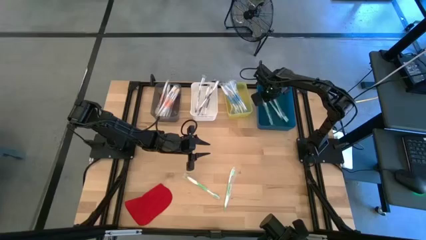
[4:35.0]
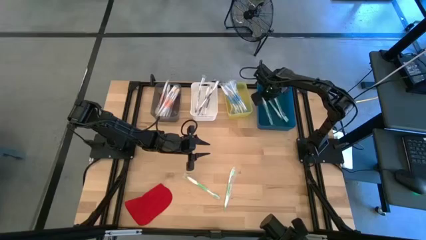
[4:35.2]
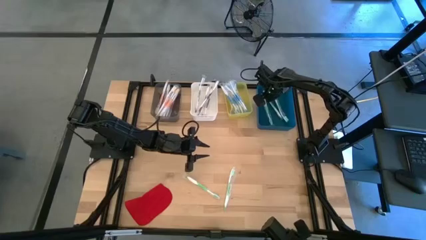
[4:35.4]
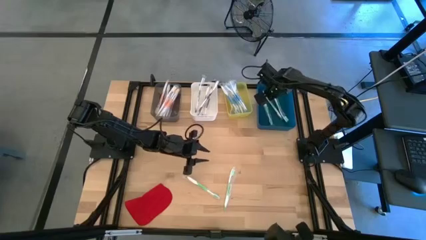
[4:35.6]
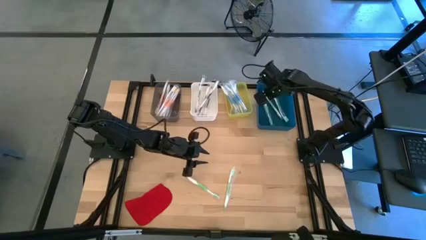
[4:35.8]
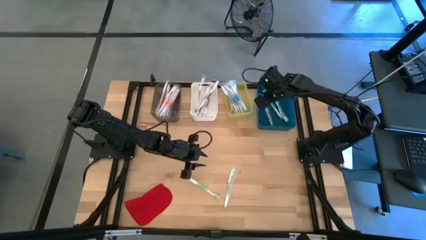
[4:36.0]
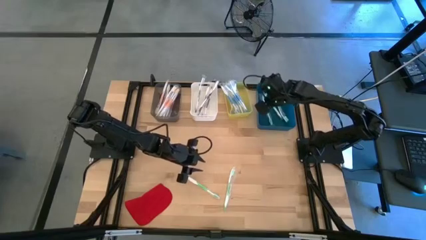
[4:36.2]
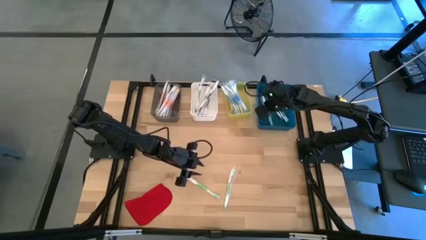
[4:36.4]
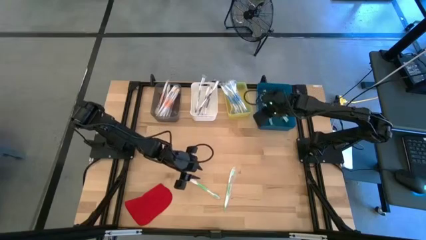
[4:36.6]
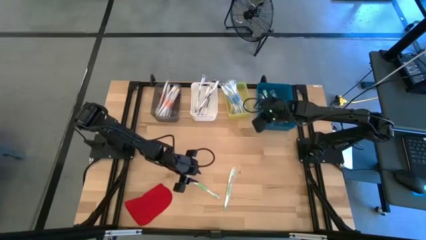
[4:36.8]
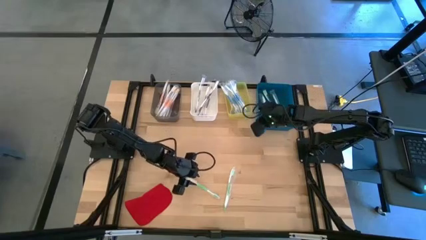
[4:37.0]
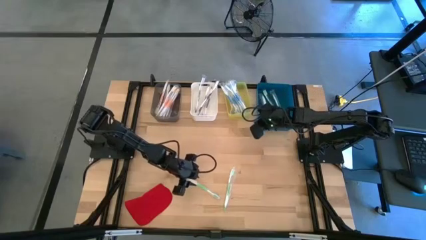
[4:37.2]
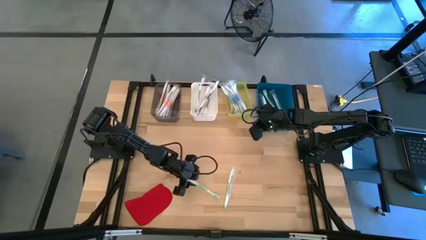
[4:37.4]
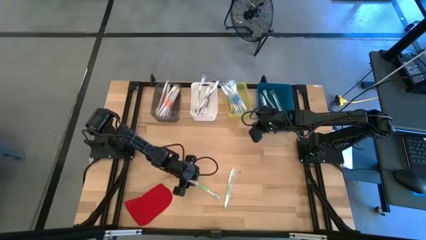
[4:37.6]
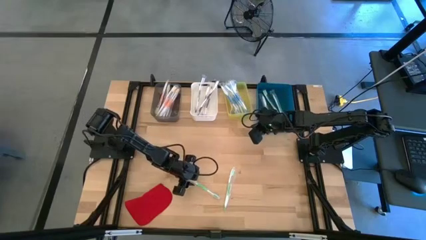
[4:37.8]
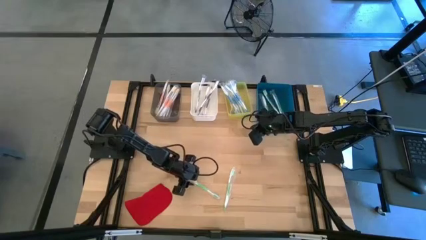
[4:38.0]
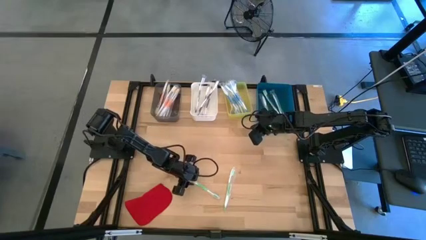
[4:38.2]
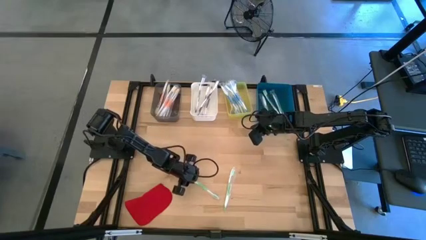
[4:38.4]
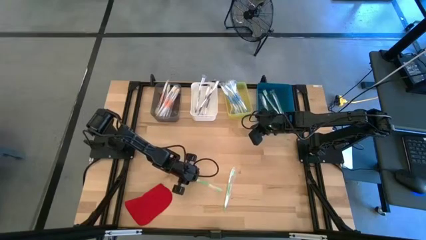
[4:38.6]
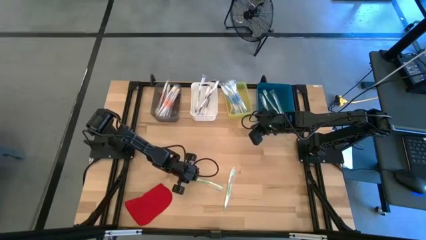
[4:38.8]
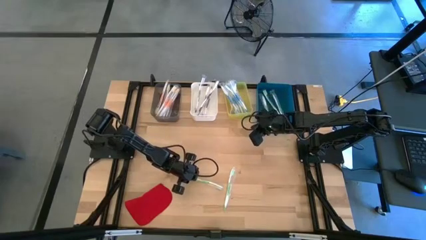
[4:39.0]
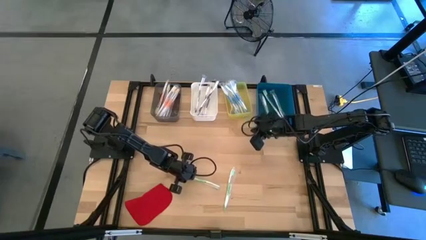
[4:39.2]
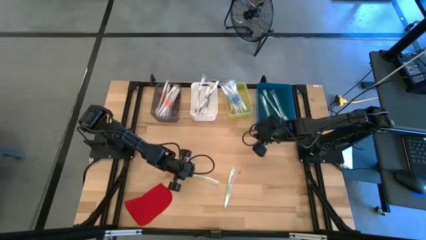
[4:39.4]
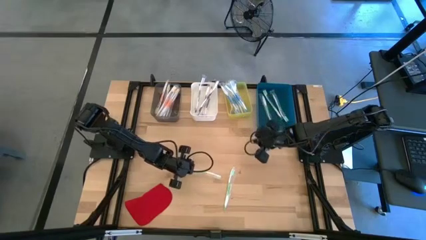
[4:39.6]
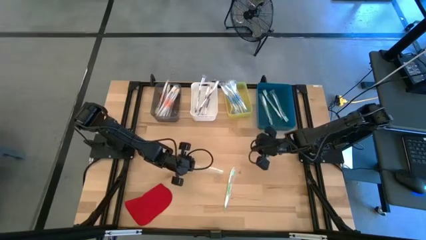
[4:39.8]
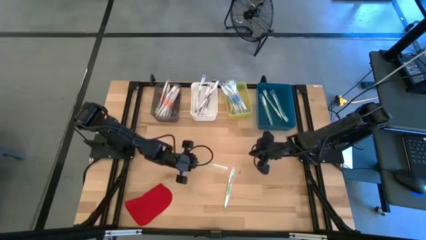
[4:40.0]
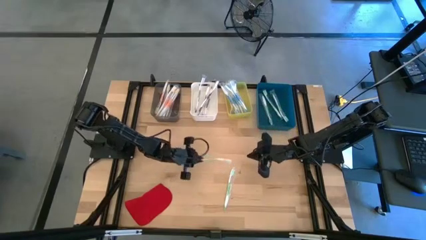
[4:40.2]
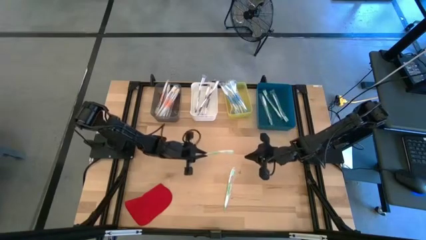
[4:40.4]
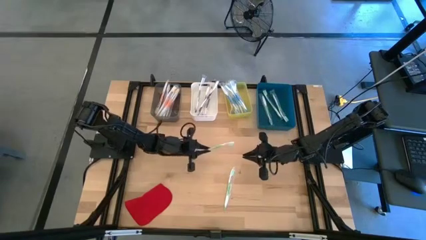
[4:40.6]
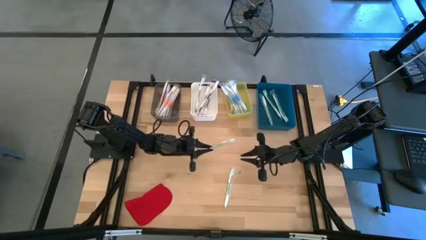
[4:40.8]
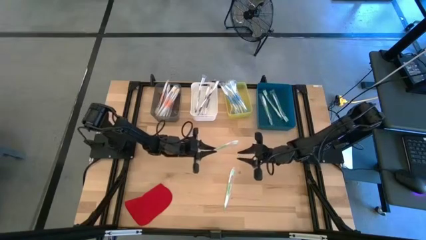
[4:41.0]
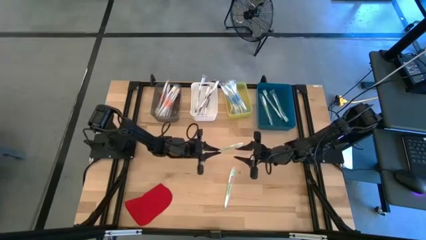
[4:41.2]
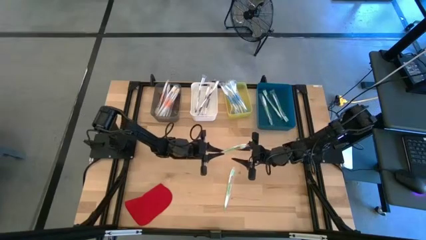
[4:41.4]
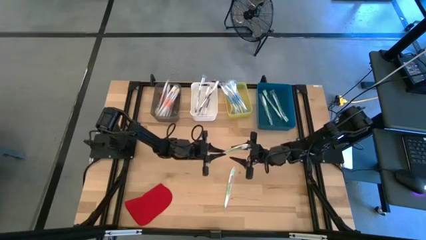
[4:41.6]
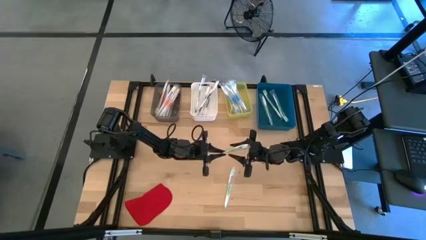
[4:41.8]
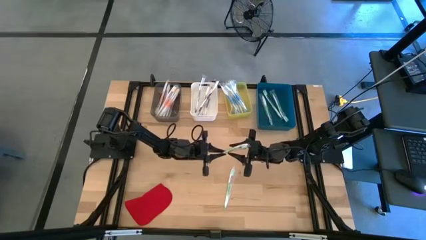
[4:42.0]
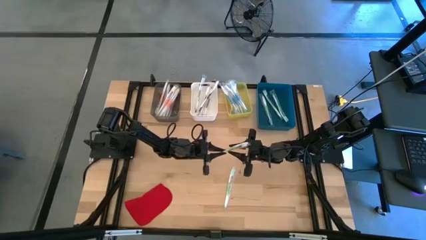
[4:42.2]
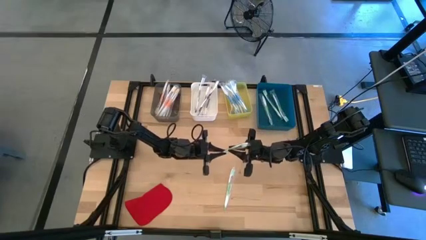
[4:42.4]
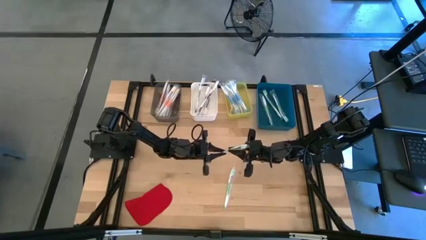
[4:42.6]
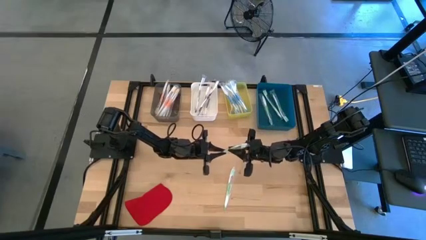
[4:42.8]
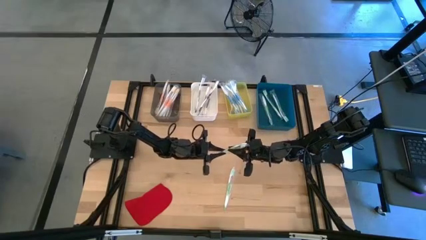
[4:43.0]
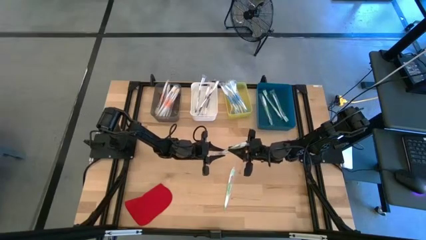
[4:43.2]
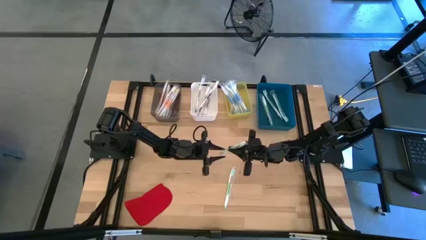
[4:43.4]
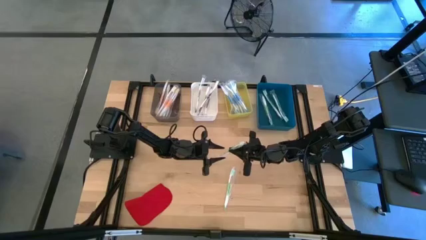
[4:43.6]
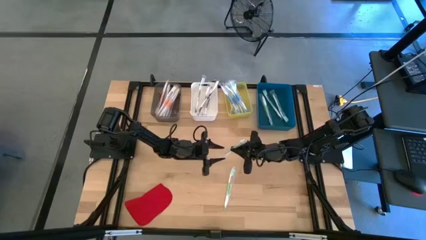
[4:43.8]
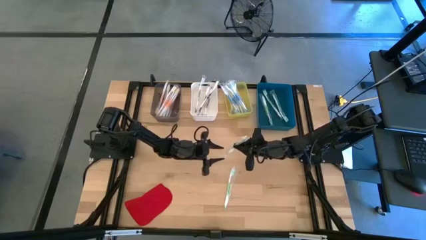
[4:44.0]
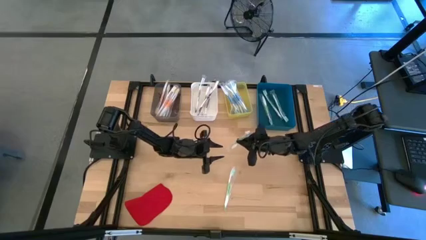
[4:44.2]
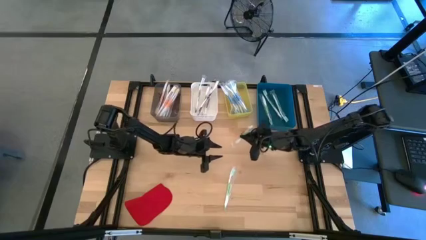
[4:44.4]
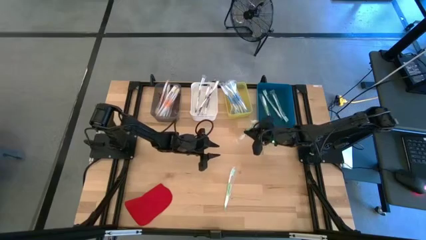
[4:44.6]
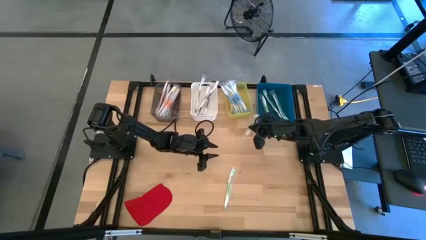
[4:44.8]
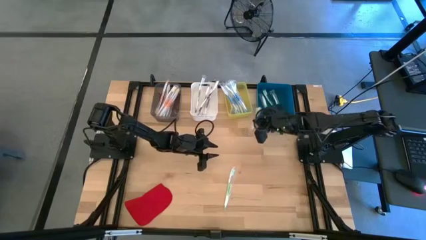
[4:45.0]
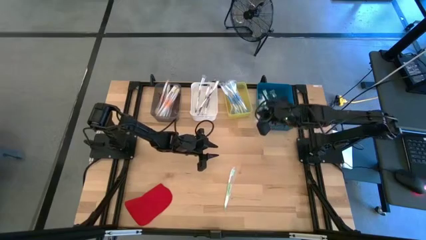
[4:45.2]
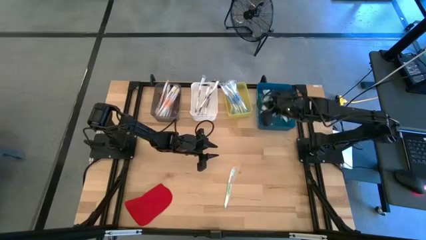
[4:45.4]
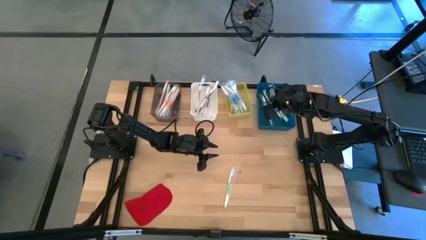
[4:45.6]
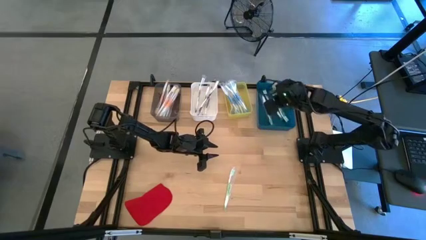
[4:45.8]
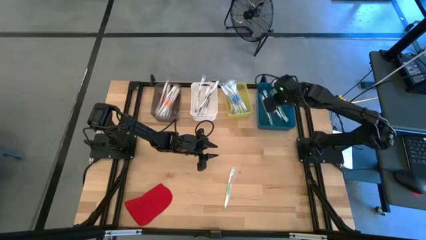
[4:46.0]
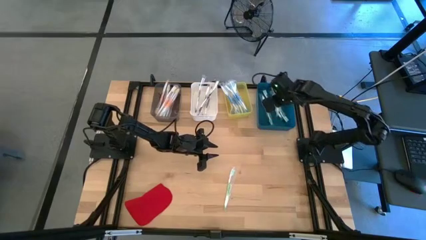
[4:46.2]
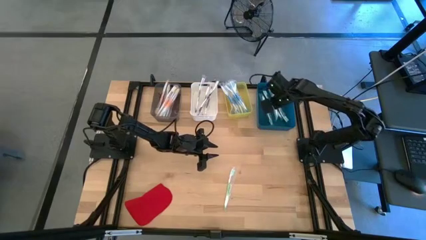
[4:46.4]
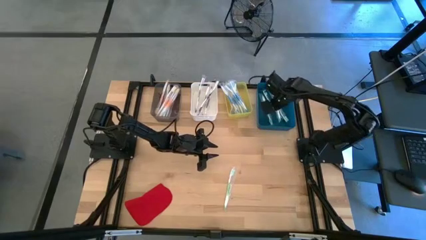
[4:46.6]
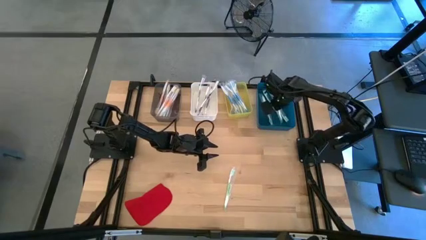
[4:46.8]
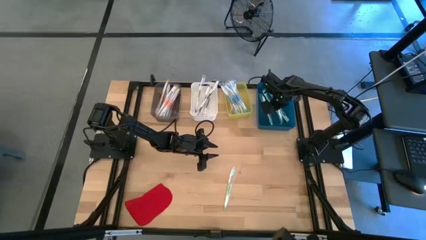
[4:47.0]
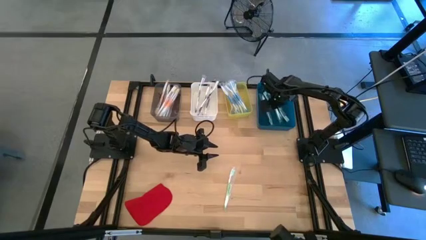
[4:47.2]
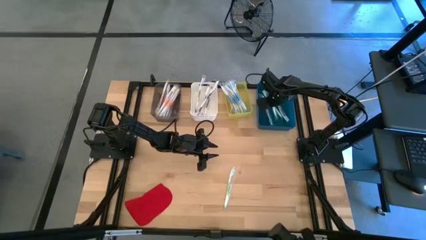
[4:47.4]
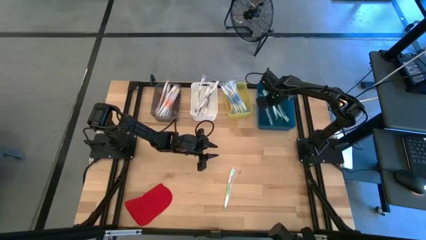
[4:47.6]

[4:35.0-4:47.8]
Task: Pick & Place Toothbrushes
Put the green toothbrush into the blue bin

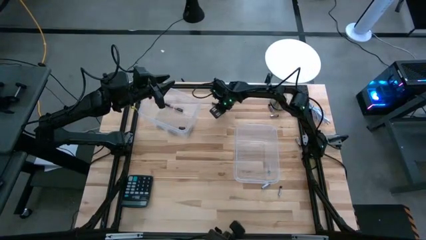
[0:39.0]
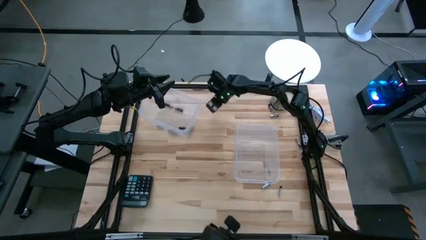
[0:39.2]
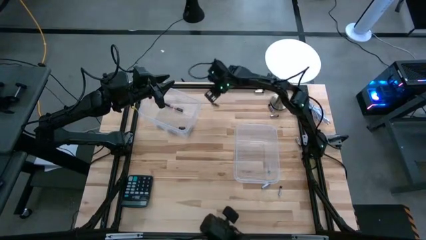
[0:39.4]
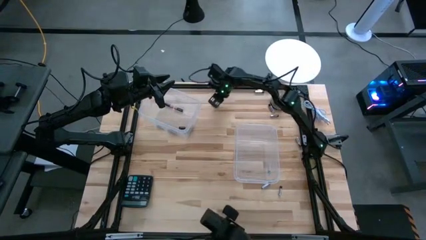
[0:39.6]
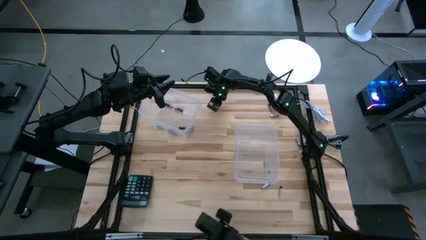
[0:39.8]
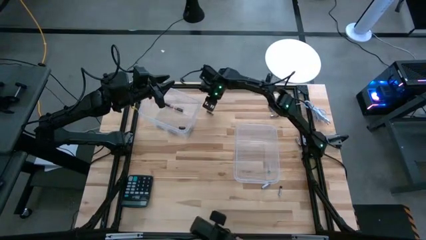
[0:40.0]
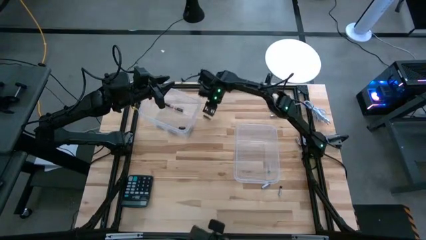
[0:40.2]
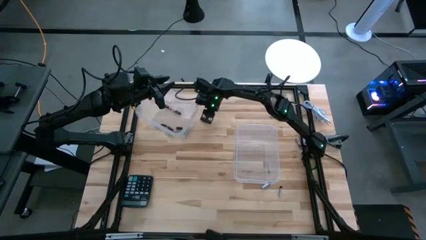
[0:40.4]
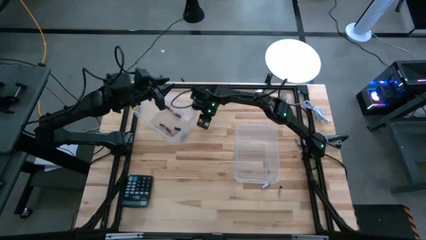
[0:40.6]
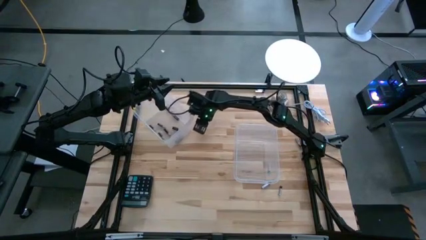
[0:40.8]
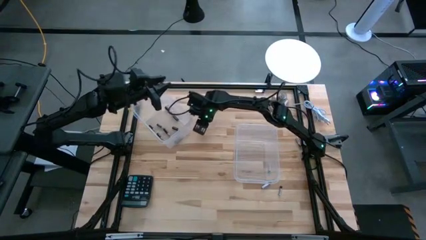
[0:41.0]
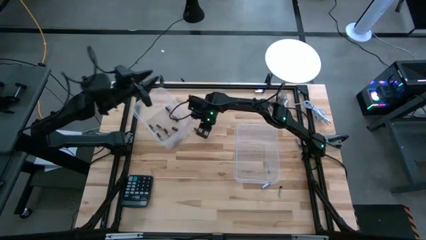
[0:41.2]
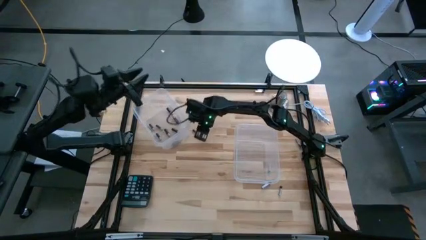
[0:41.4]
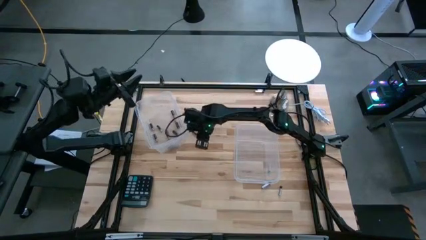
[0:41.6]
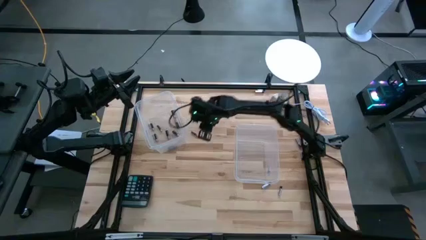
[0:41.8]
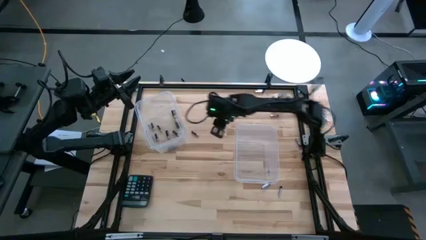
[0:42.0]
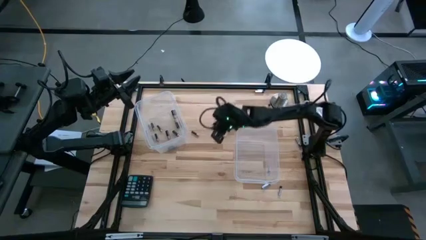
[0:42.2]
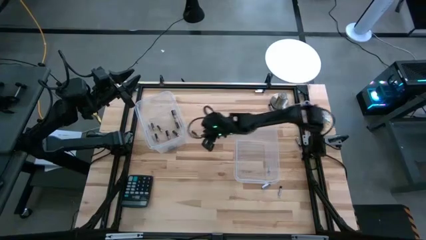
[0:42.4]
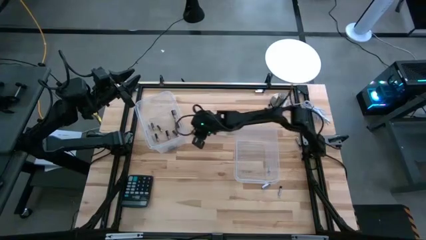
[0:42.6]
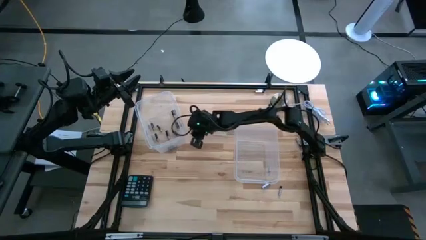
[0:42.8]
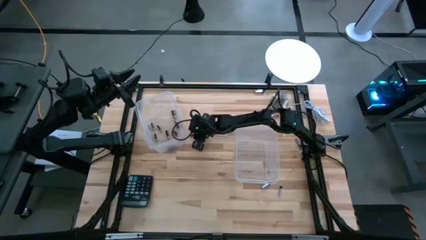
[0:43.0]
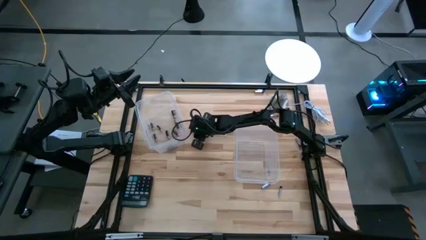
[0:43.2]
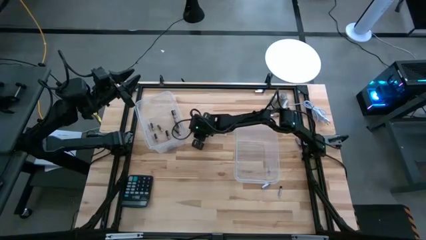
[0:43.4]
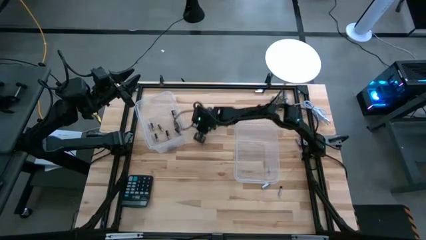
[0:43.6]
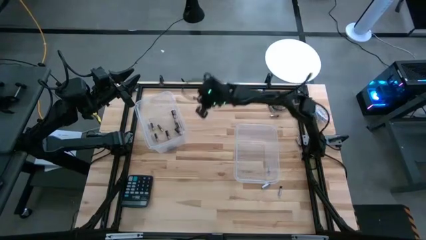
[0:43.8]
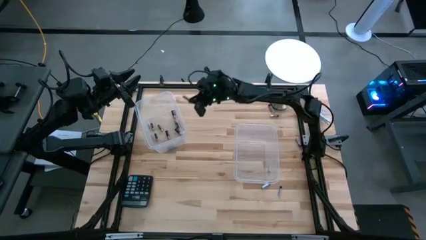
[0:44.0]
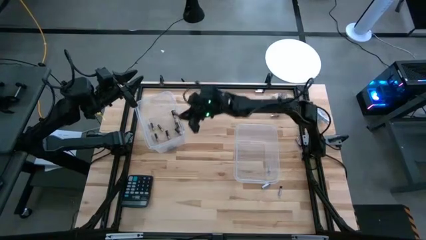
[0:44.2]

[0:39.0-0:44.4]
Task: Sort batteries
Put the black battery into the left transparent bin
